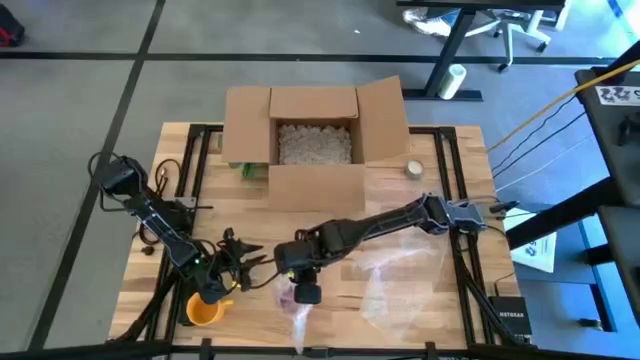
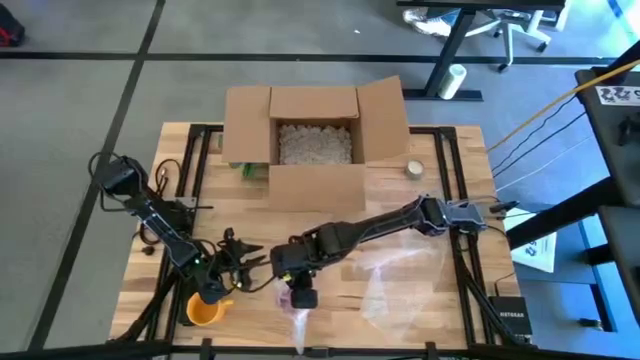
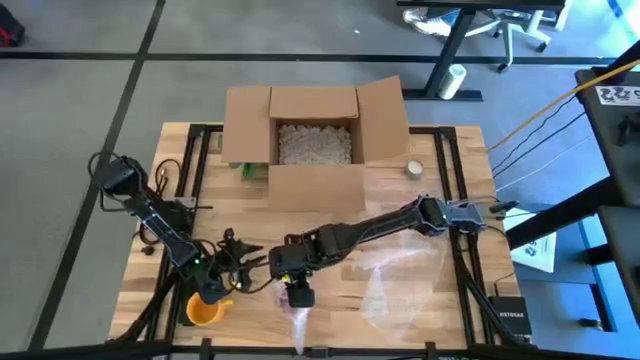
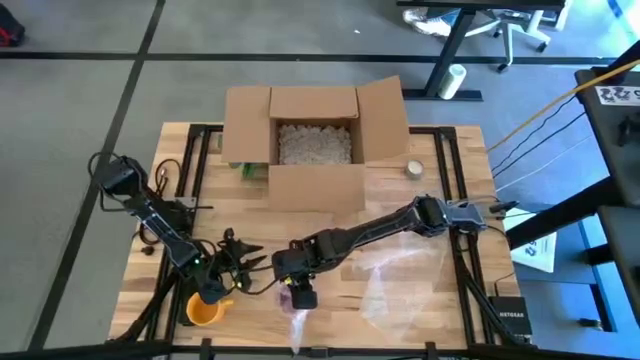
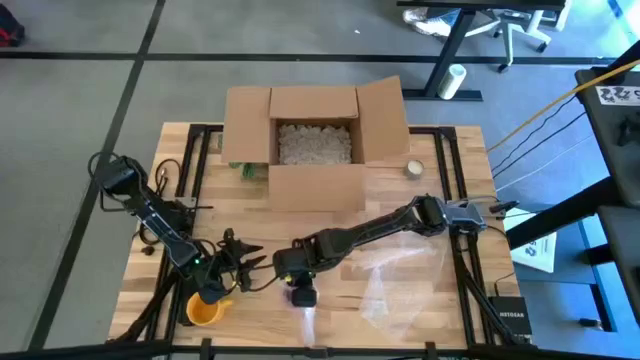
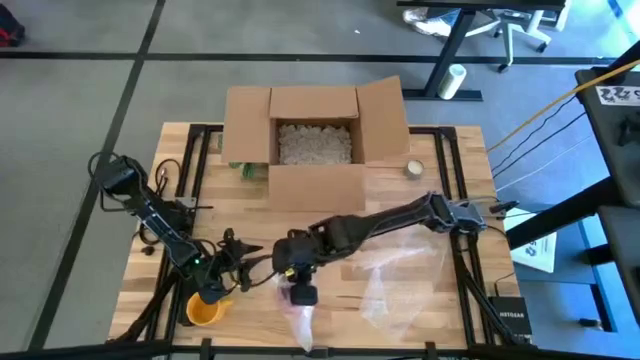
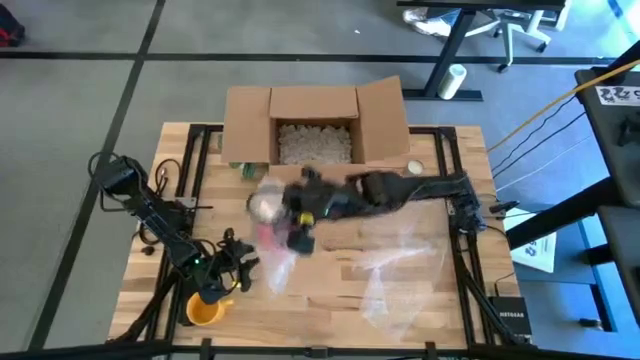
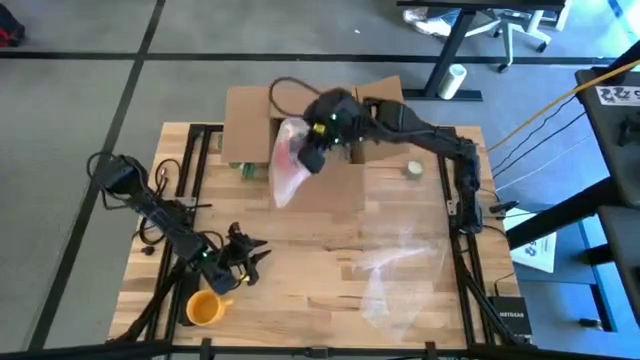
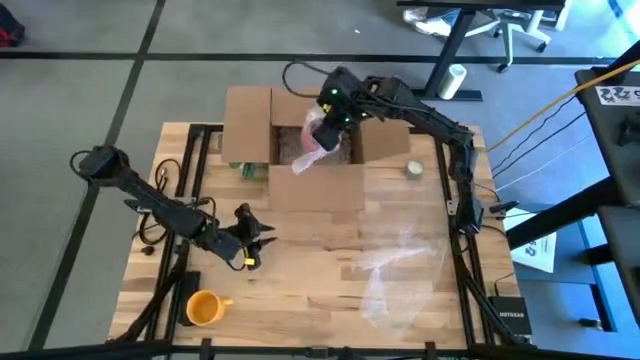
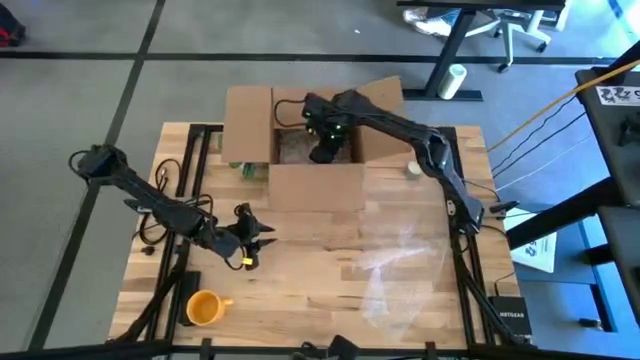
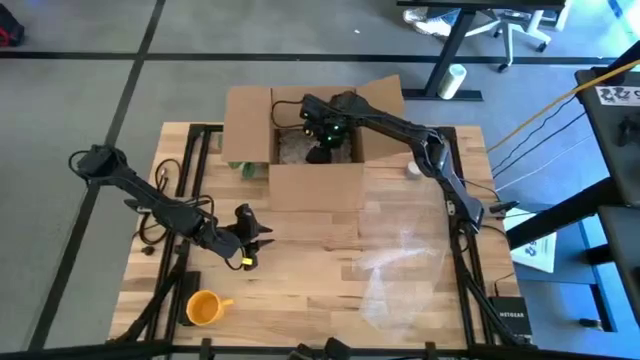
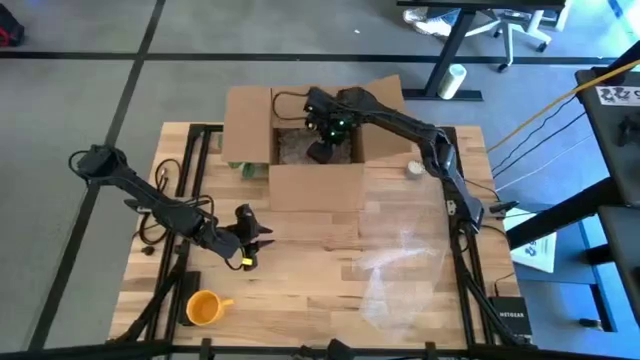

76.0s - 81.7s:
Task: wrap mug
Put the wrapped red cup into the cardboard box

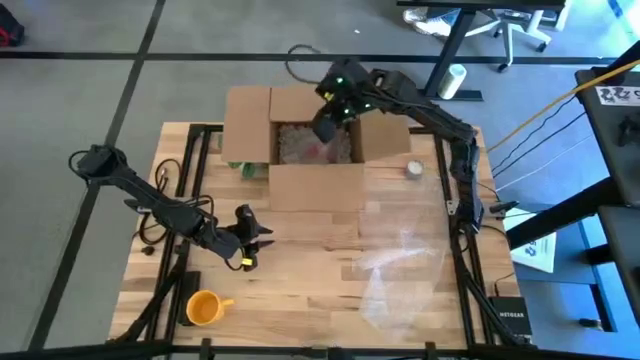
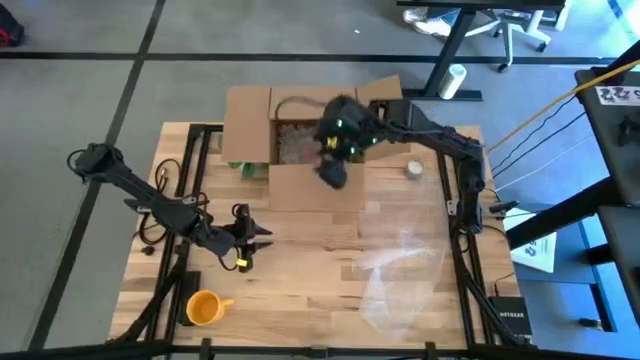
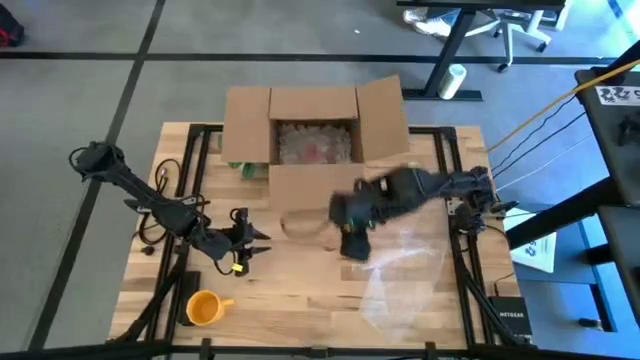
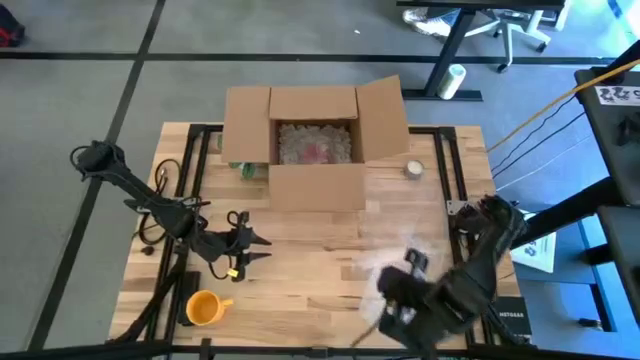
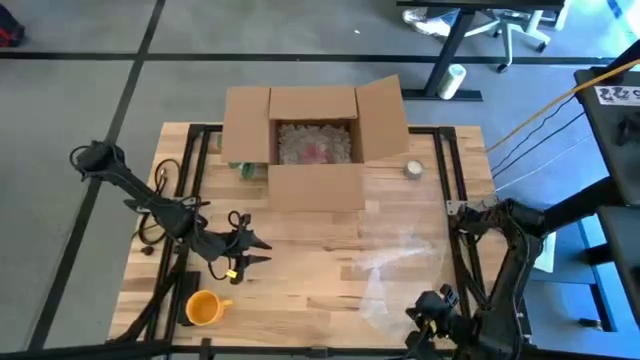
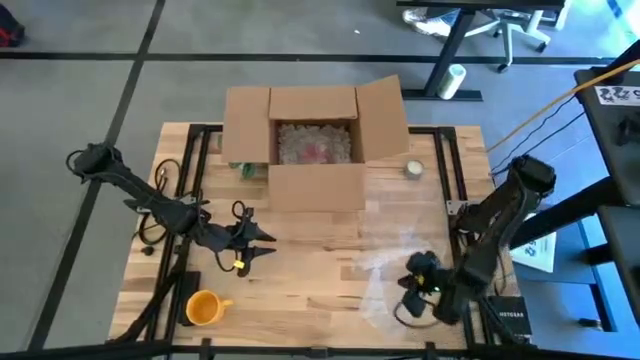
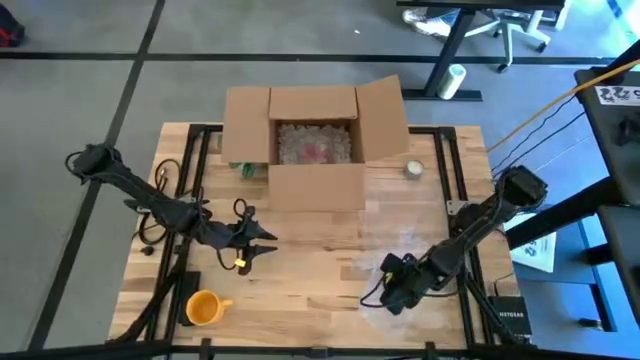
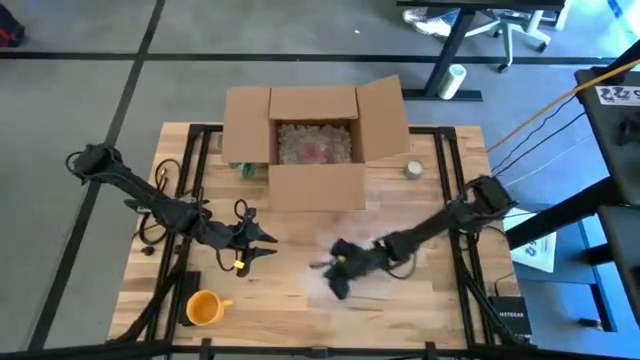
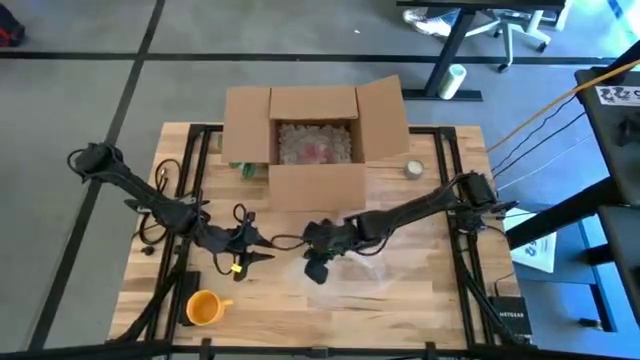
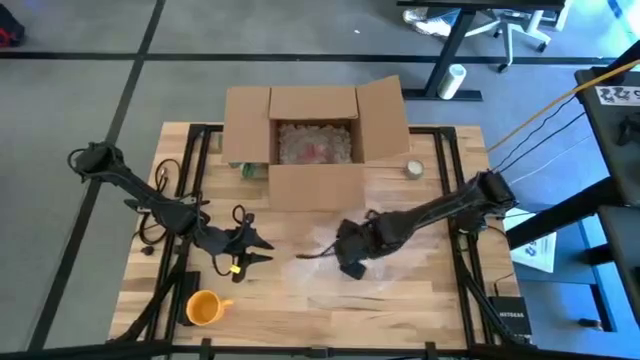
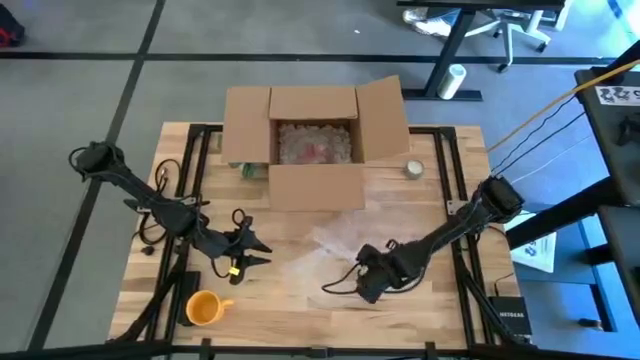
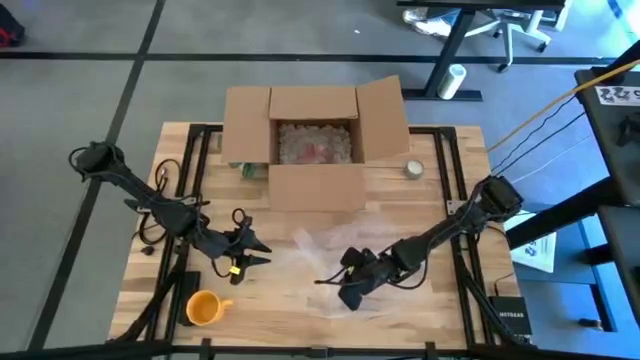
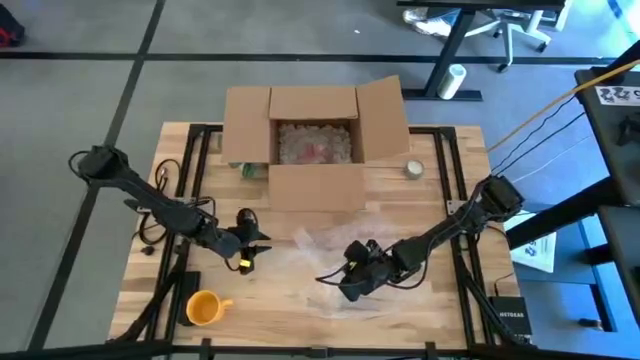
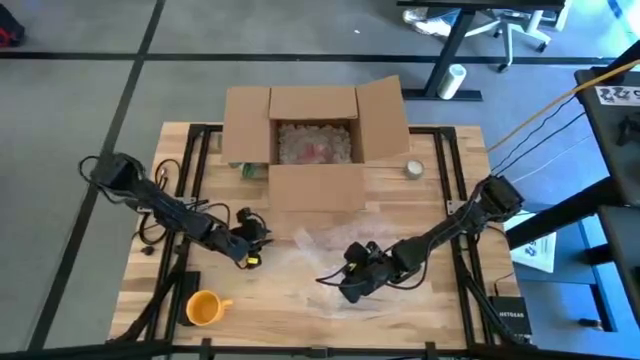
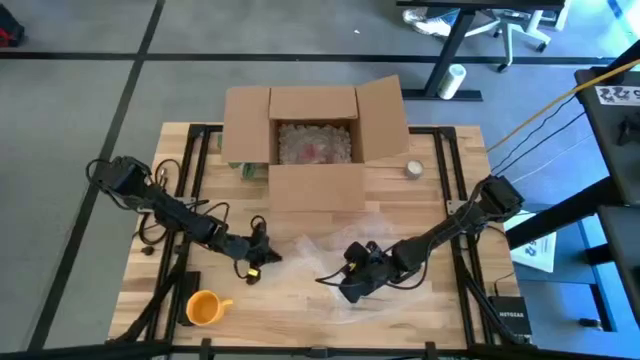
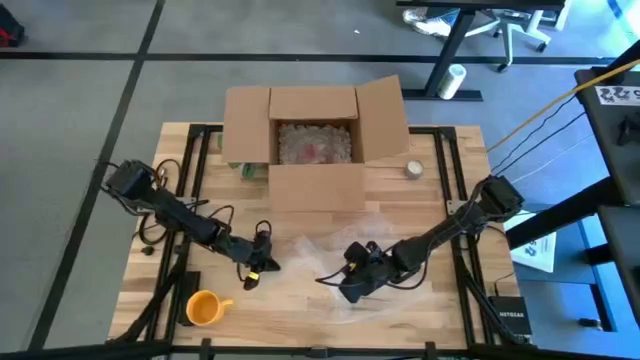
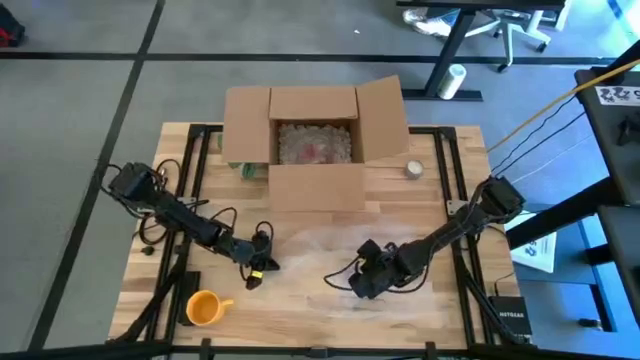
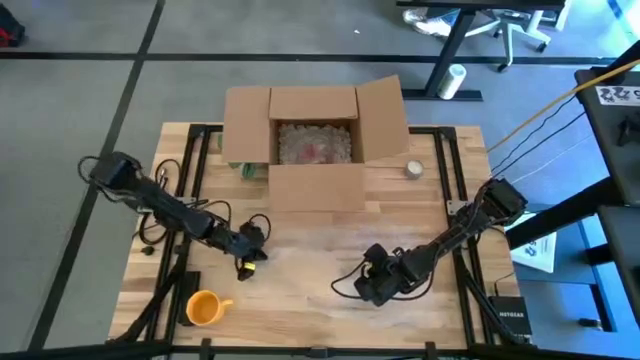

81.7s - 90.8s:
Prepare the bubble wrap

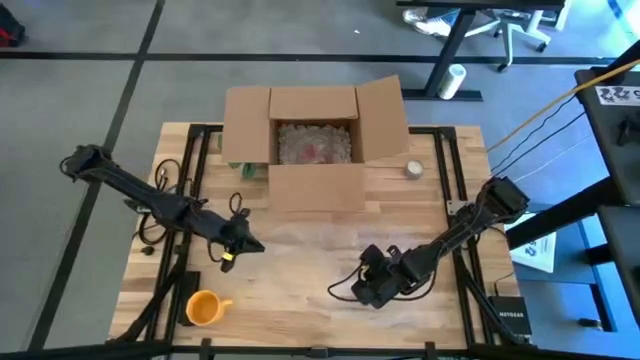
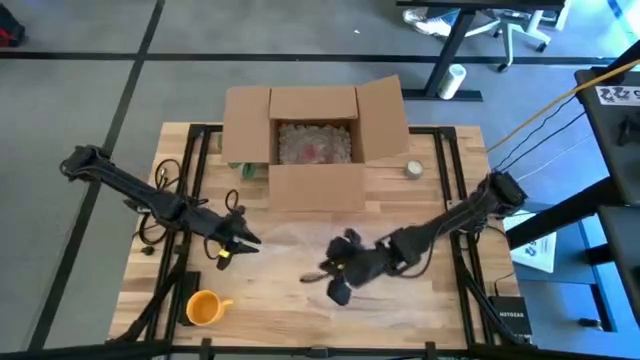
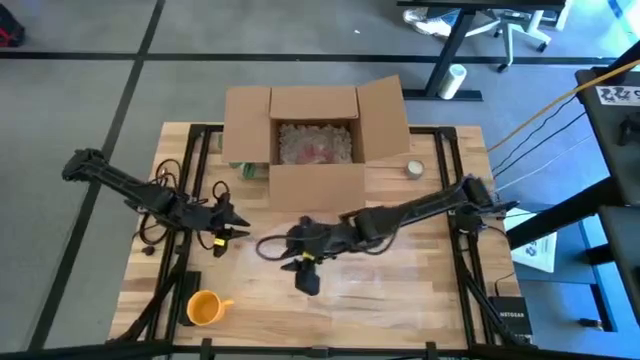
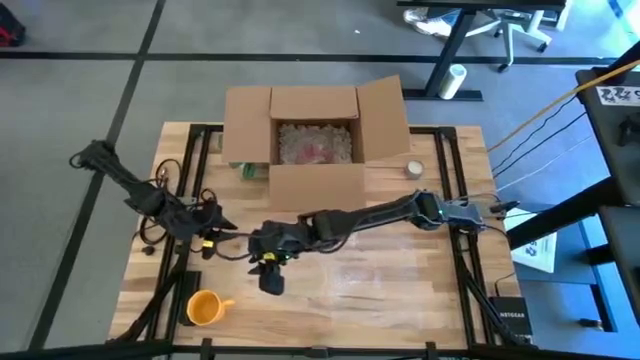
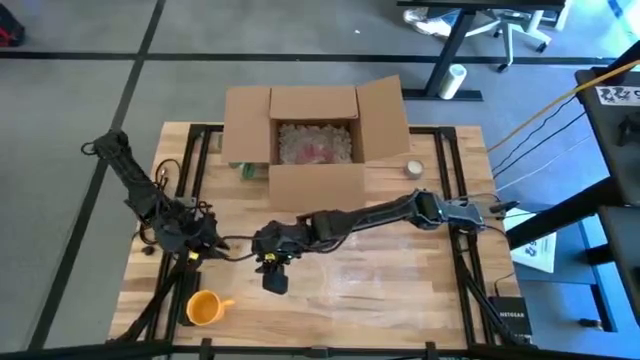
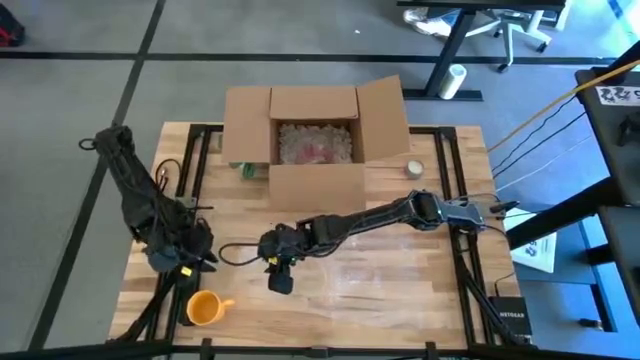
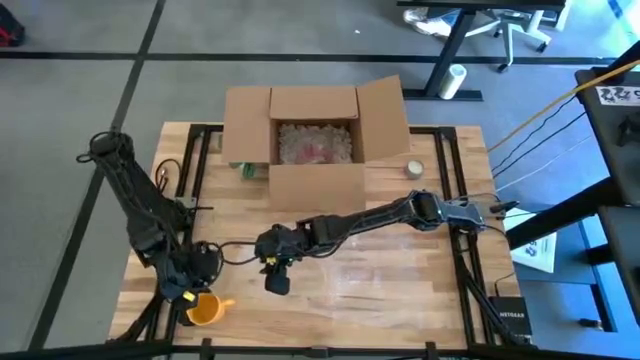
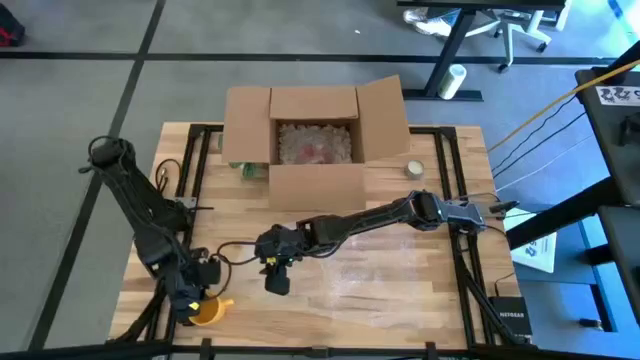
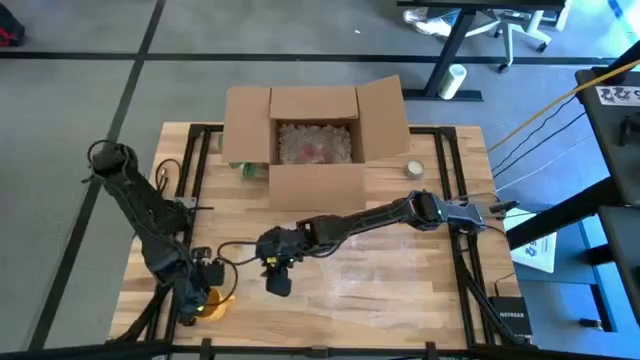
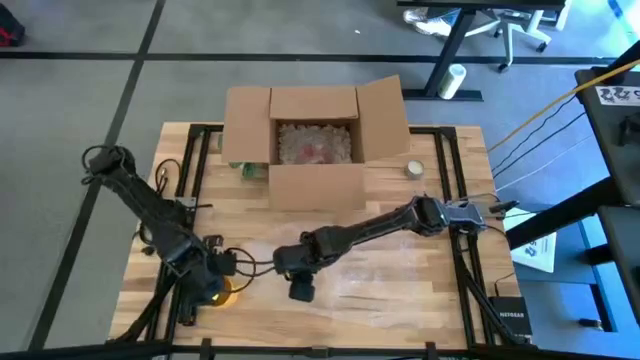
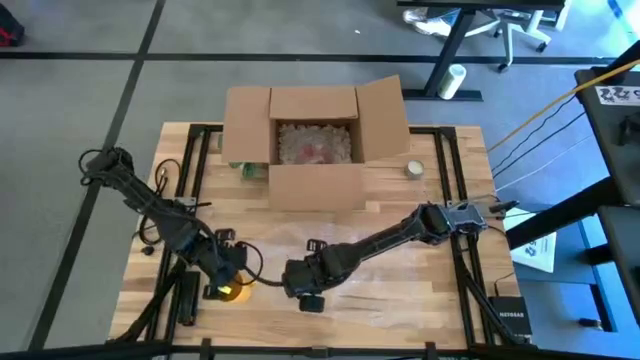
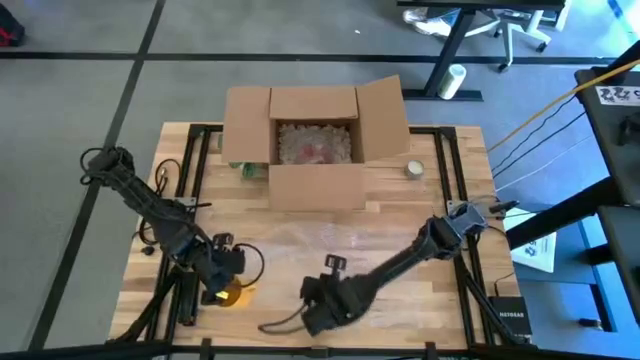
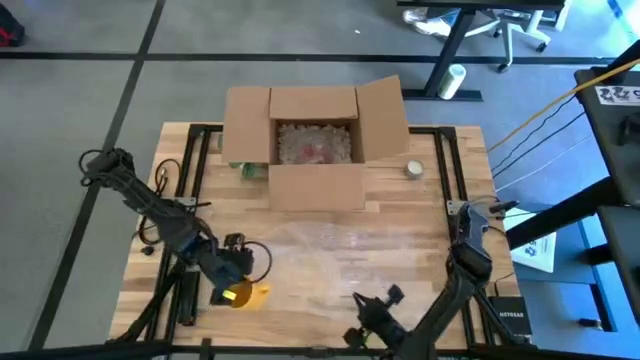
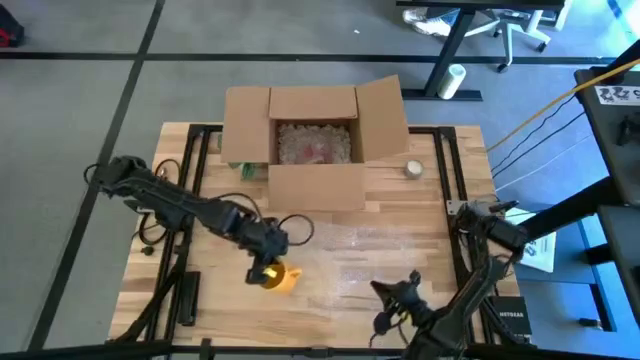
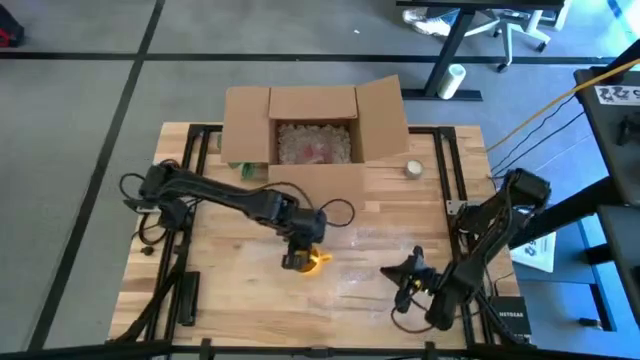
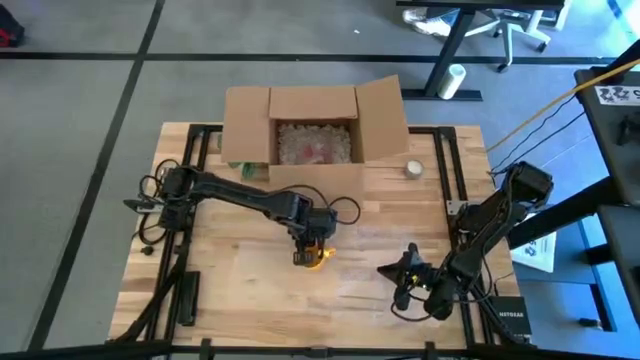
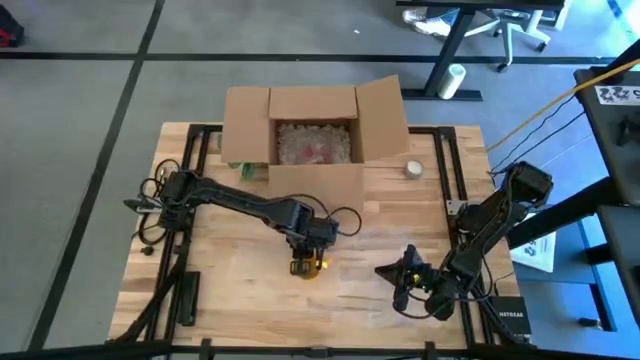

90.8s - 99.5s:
Put the yellow mug on the bubble wrap
